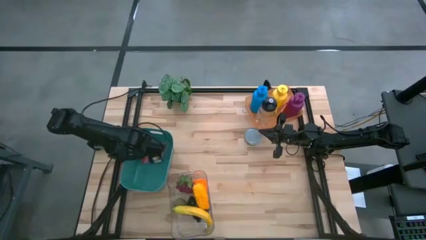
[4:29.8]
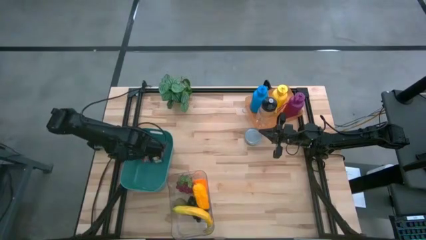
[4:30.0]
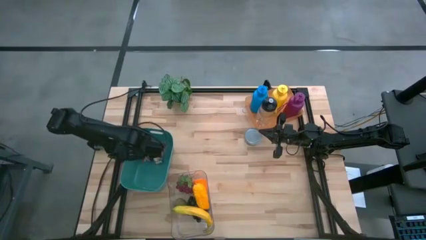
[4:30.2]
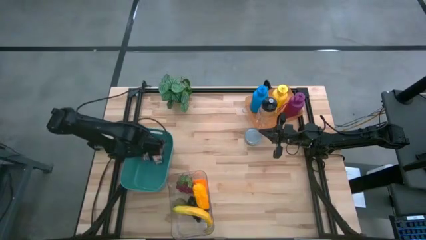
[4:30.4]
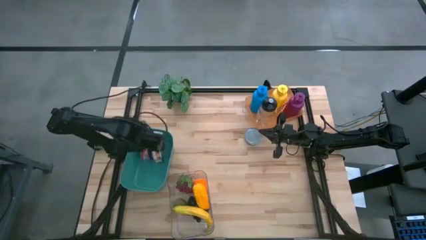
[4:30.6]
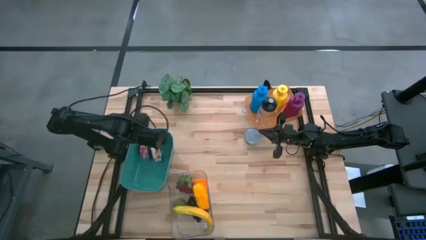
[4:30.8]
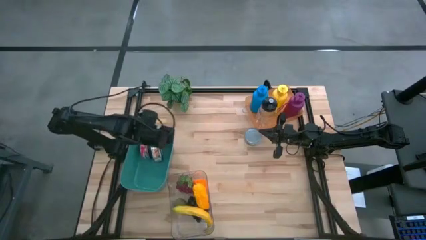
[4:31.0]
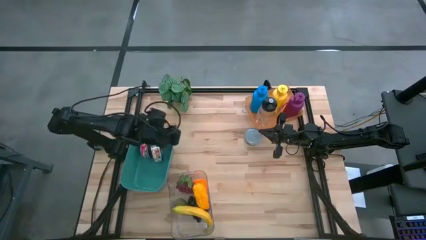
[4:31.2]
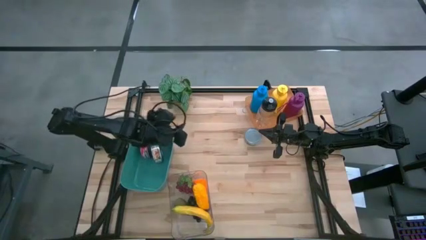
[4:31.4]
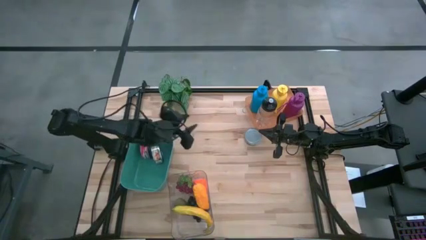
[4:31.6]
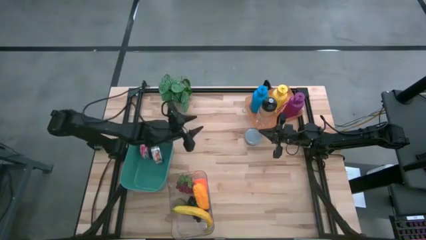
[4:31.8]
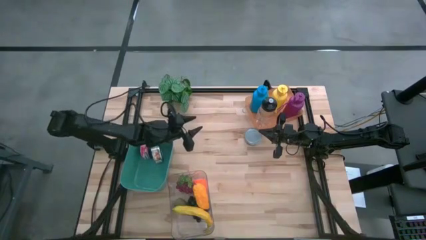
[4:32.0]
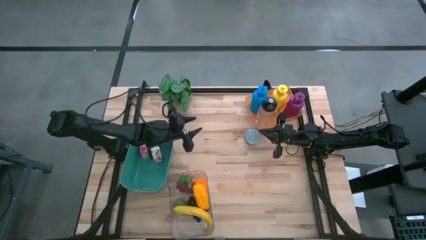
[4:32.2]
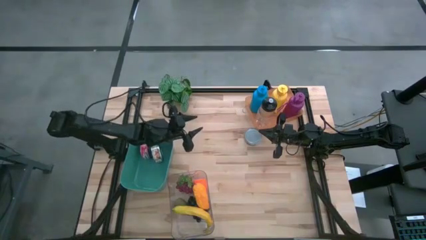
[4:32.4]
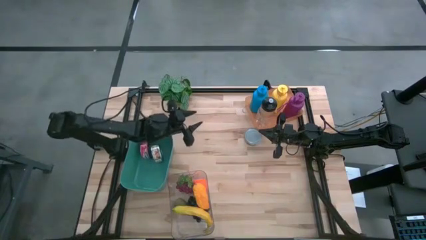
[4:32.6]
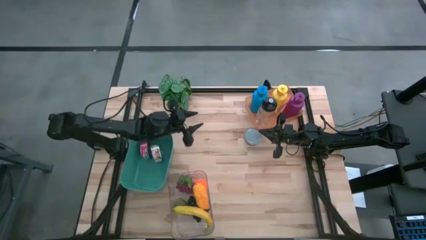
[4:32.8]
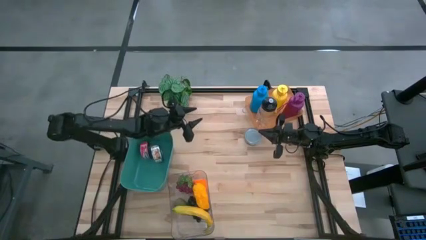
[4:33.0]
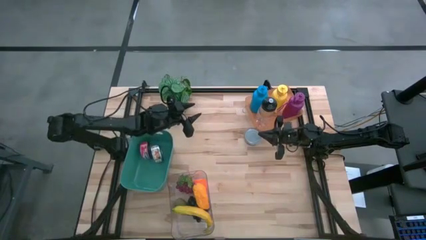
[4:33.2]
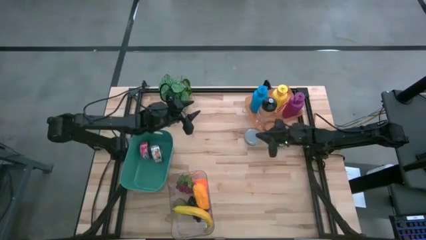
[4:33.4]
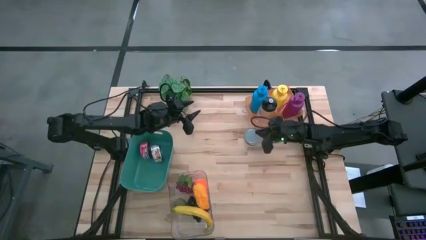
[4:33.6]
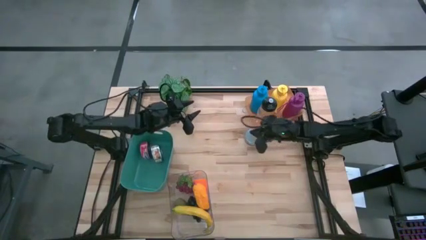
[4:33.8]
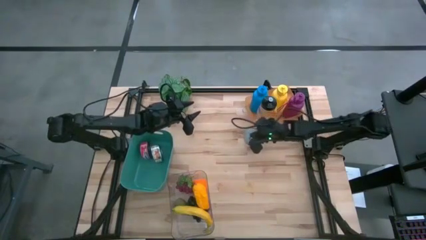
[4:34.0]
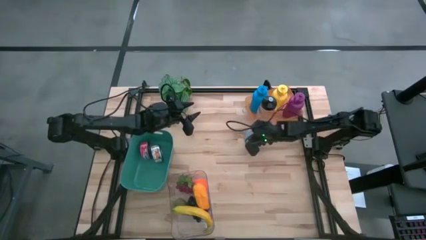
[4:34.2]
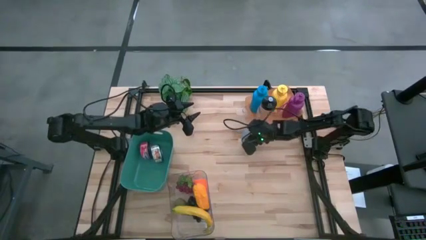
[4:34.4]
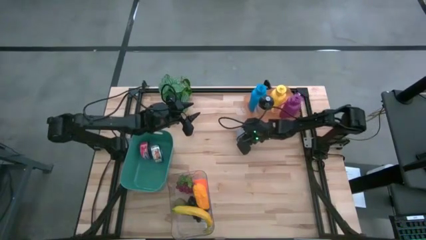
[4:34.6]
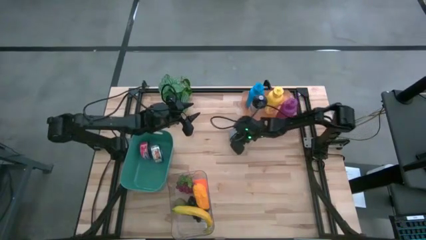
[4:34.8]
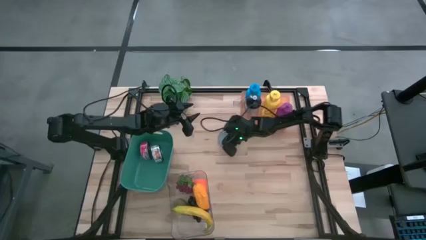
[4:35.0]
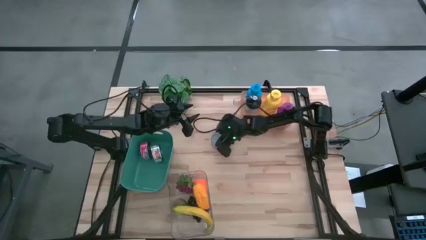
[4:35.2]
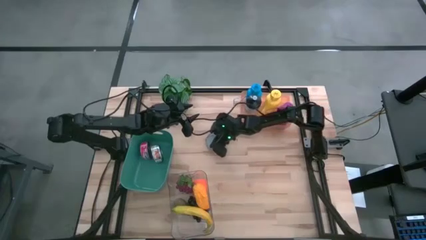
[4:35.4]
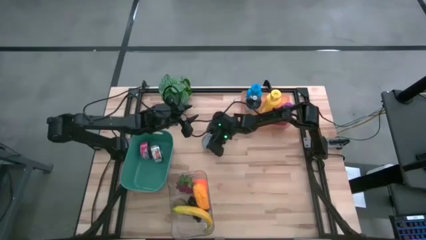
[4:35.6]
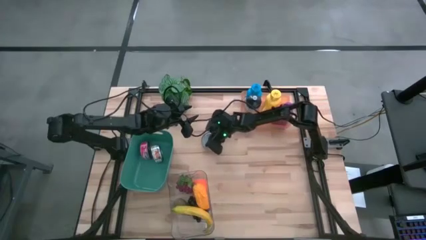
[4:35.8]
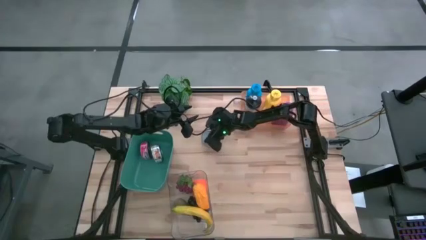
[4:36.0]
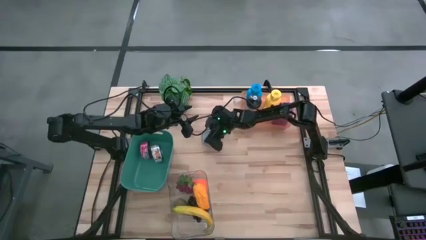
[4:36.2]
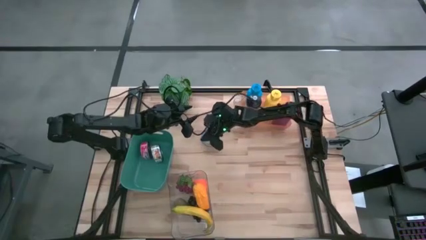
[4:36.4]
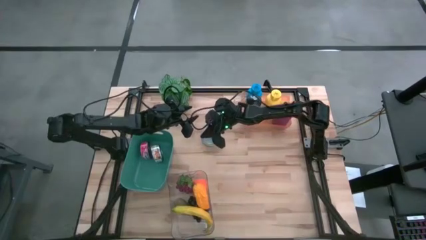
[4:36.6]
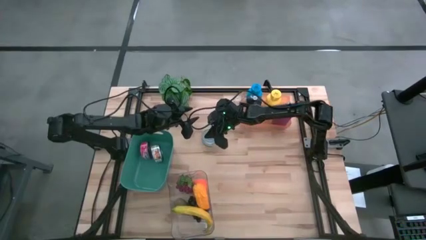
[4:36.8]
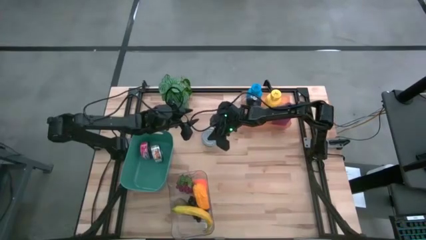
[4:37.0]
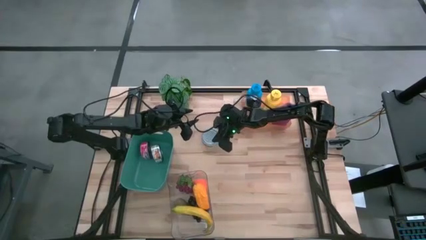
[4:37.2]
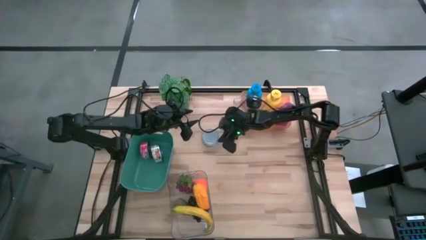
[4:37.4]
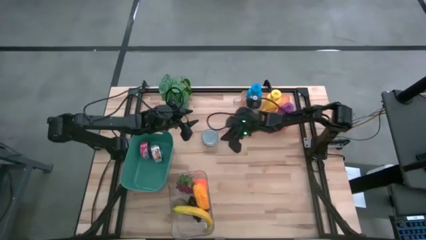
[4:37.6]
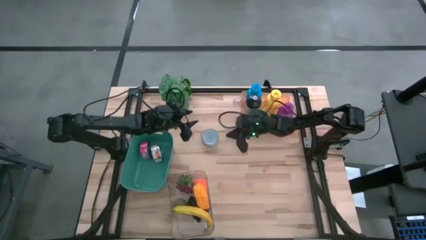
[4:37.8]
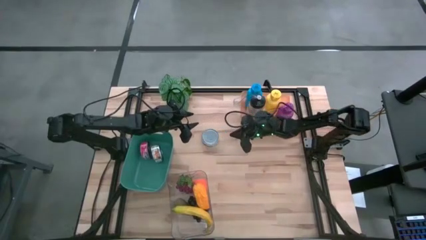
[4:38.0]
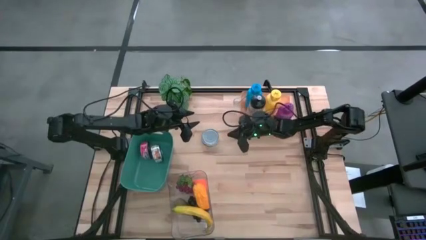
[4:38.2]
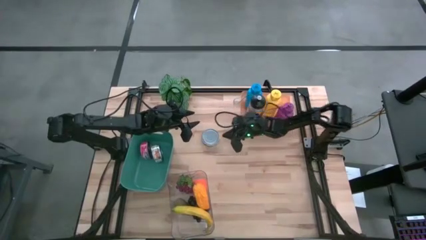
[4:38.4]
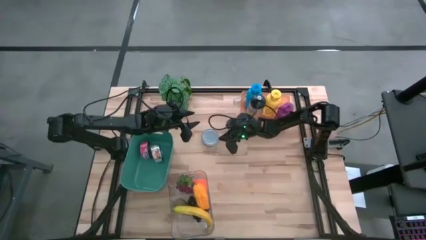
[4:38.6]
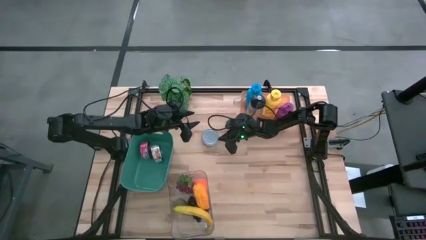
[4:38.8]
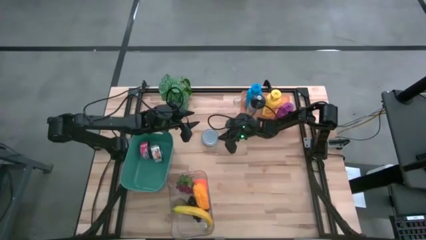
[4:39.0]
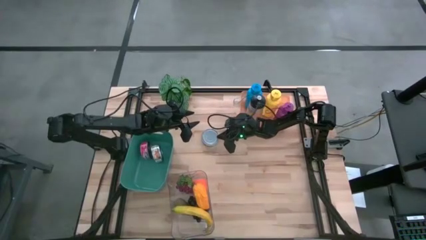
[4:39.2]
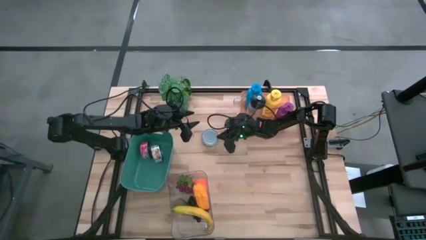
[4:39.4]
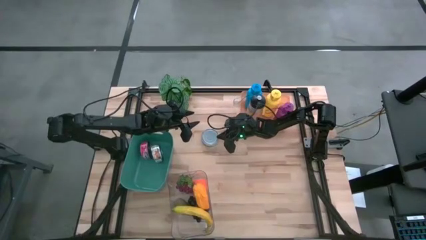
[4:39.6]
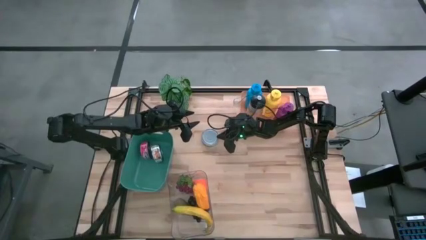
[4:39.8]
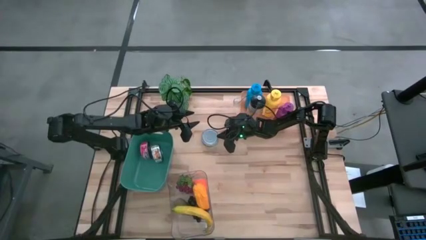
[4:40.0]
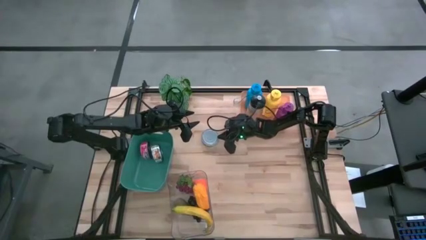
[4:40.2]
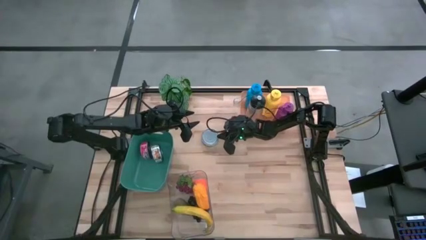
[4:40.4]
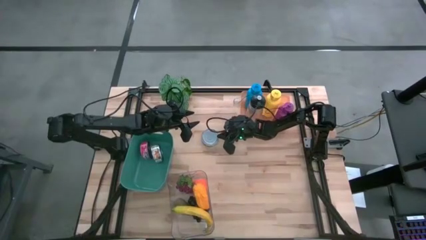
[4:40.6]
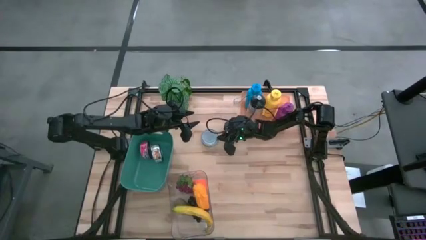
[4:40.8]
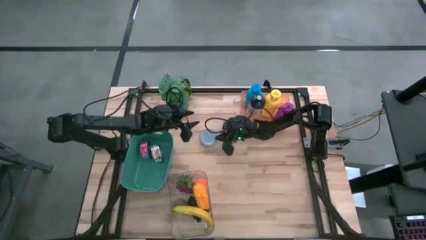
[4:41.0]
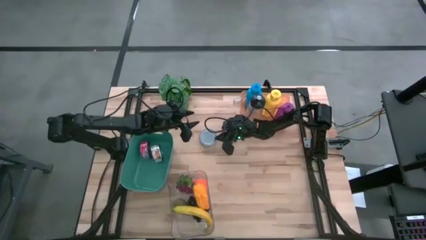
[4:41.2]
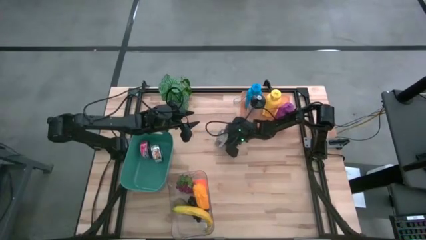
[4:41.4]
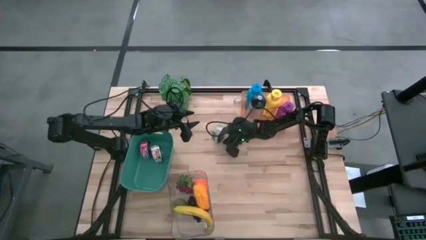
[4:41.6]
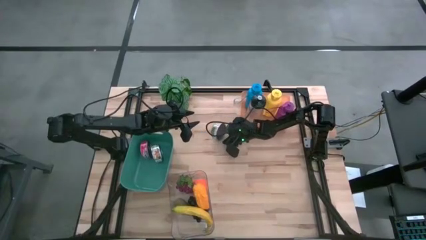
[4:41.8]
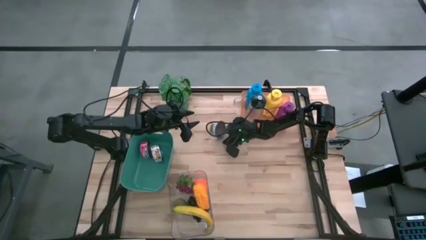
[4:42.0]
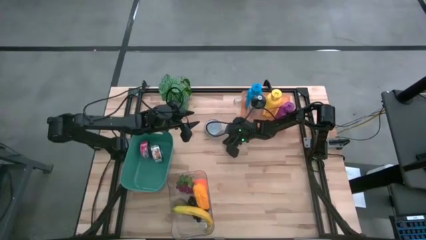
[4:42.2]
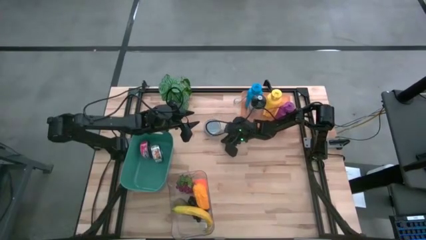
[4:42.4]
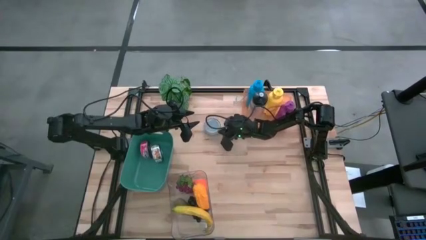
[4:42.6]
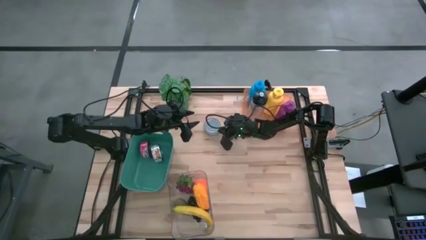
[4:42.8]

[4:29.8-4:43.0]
Task: Pick & Place Food Item
Put the green tuna can into the blue bin

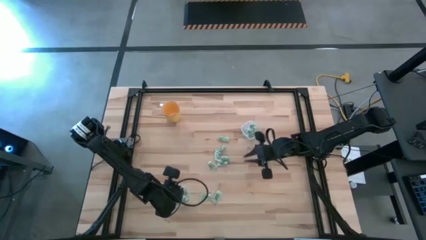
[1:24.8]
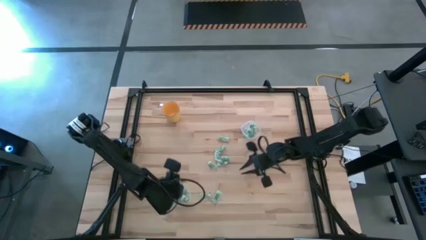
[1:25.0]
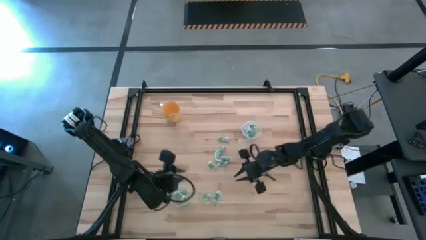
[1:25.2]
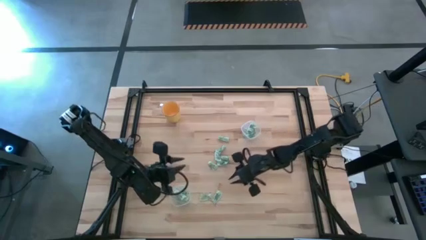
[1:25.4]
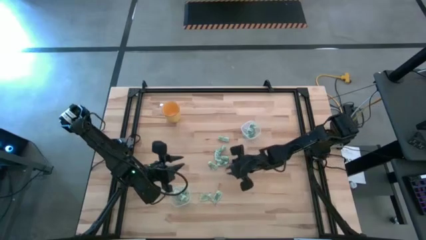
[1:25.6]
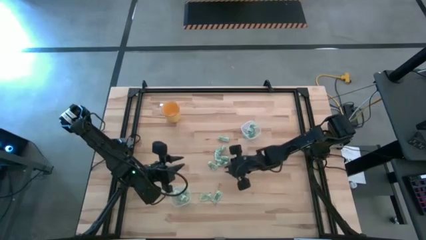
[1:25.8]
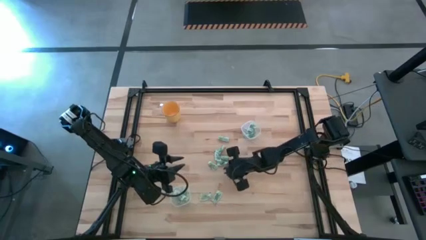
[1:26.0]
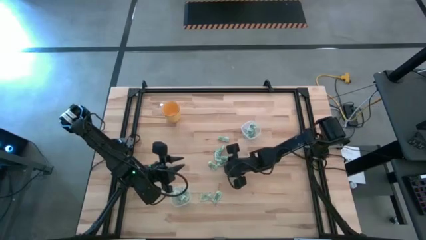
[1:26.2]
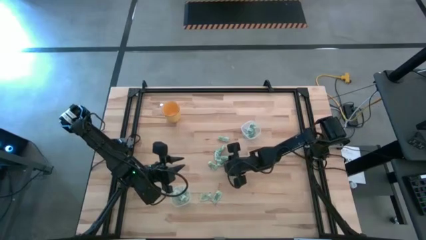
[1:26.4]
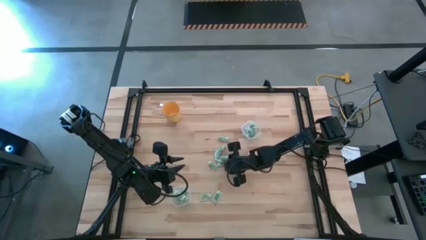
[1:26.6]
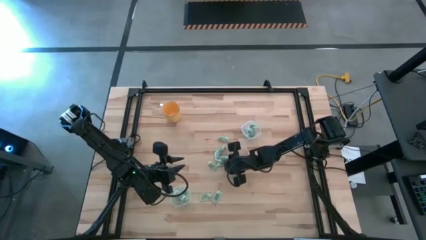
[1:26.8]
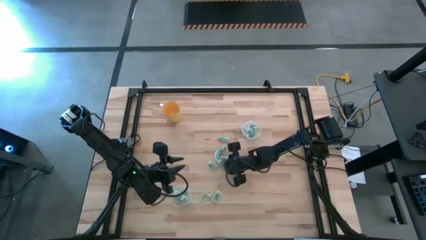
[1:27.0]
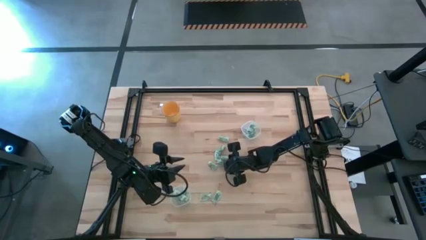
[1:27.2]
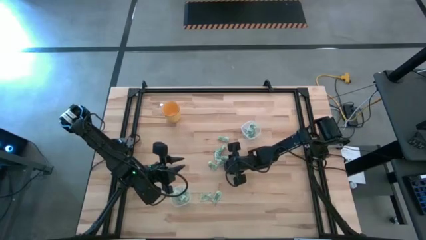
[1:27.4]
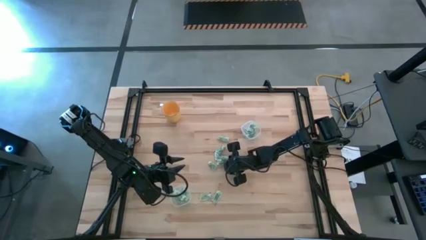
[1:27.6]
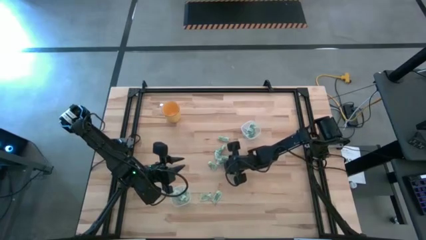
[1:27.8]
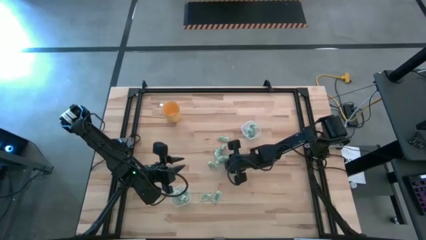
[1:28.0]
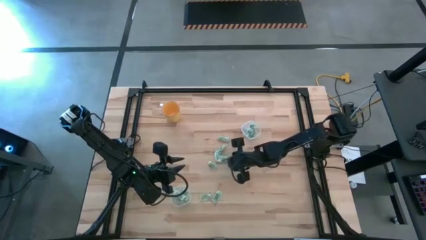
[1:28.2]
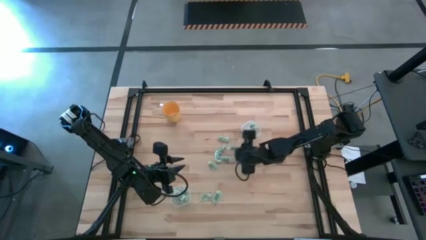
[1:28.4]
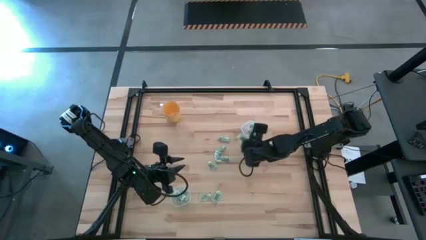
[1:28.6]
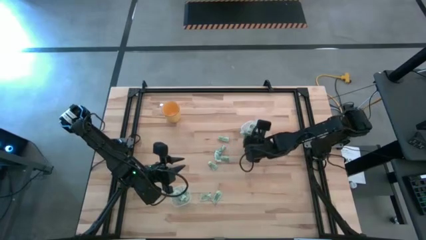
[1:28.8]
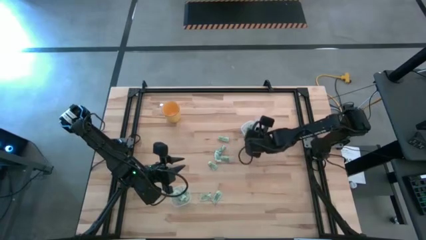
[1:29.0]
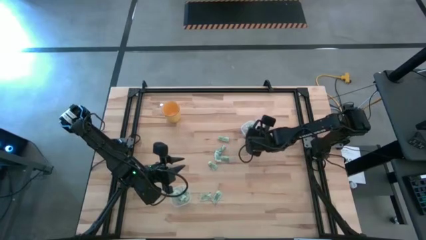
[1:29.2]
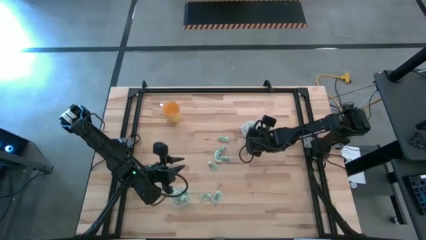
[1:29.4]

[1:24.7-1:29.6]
Task: Pick and place Stevia / Truvia into bins
Put the green stevia packet into the top transparent container
